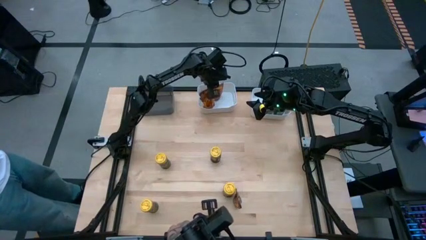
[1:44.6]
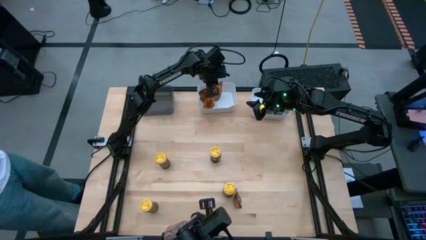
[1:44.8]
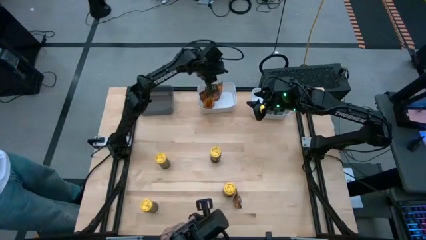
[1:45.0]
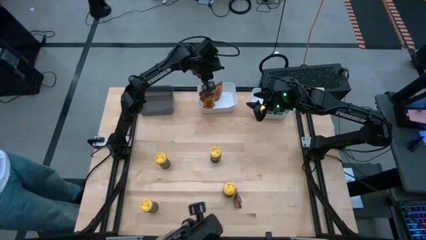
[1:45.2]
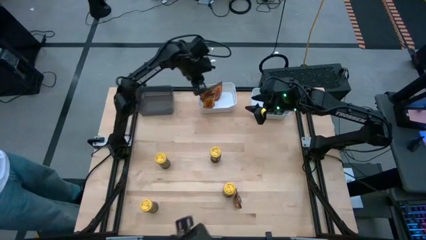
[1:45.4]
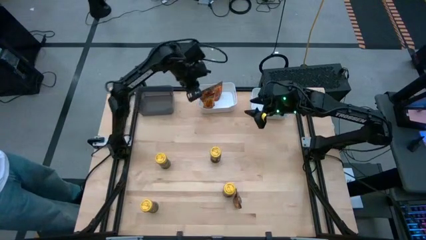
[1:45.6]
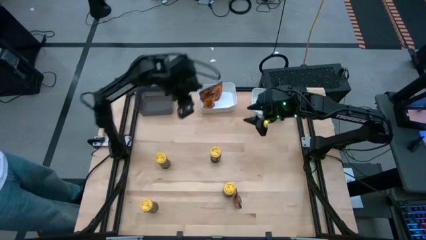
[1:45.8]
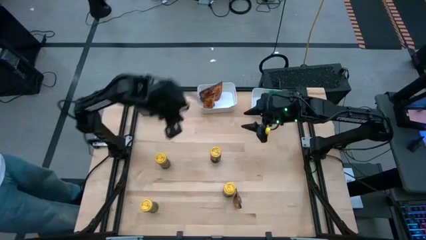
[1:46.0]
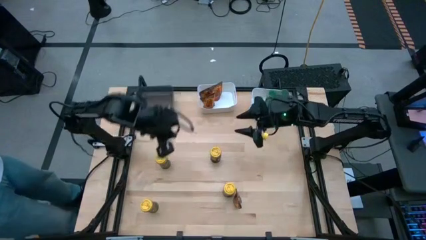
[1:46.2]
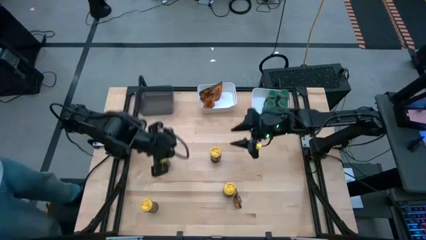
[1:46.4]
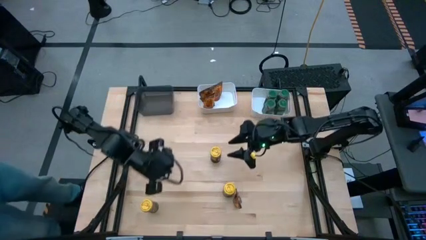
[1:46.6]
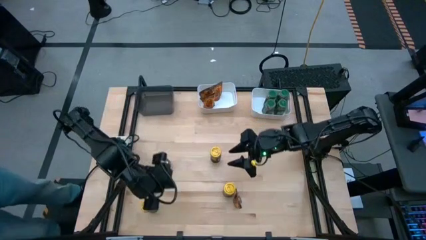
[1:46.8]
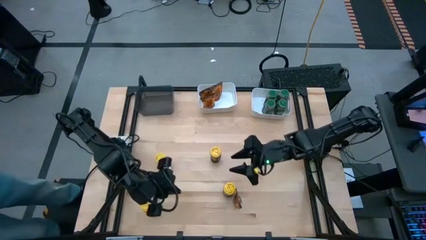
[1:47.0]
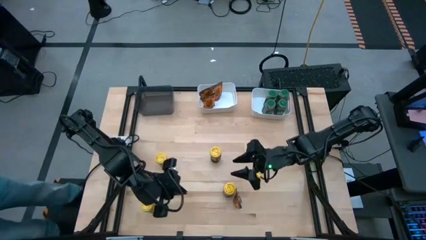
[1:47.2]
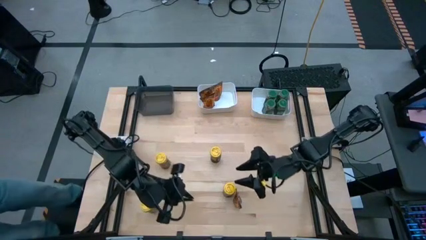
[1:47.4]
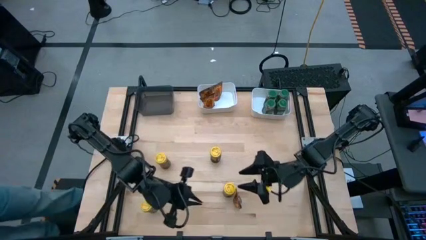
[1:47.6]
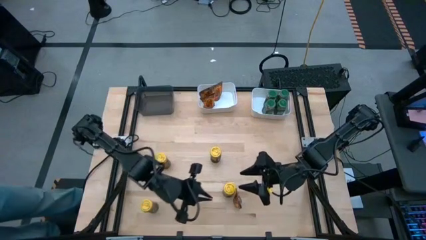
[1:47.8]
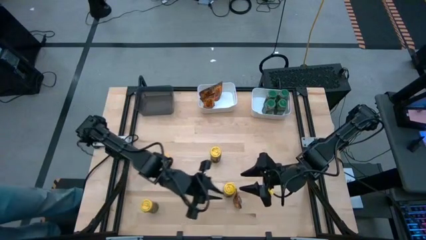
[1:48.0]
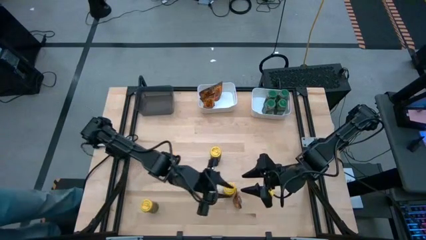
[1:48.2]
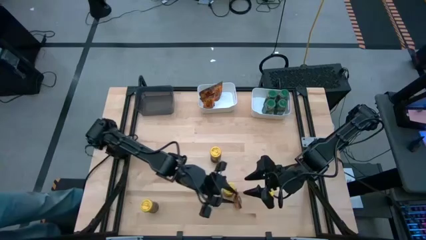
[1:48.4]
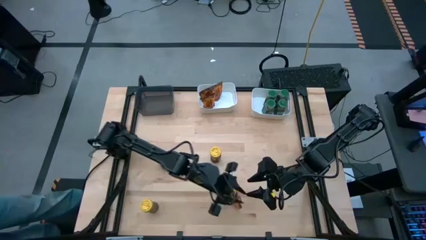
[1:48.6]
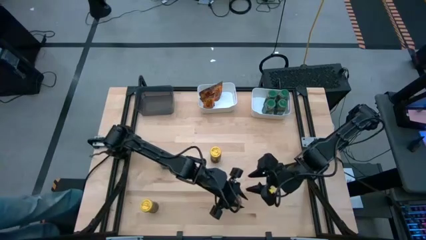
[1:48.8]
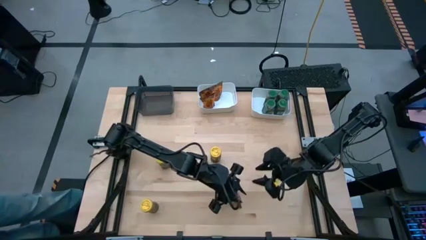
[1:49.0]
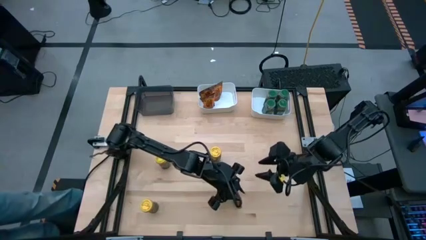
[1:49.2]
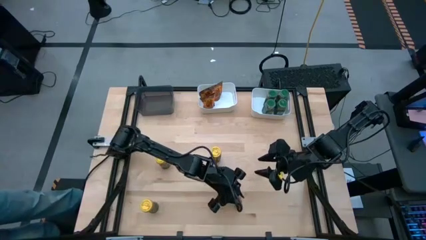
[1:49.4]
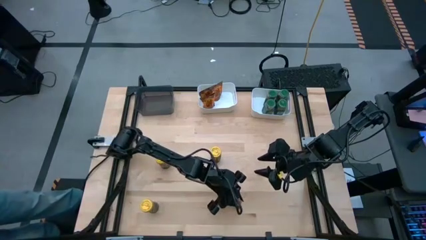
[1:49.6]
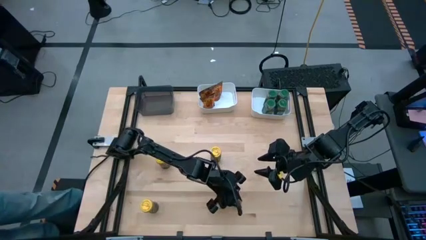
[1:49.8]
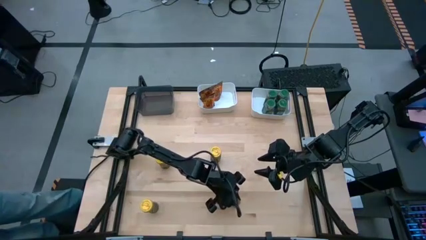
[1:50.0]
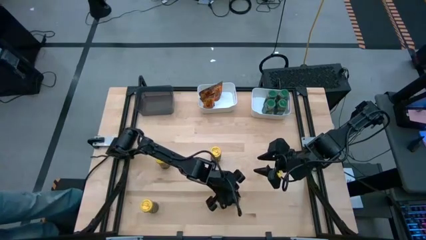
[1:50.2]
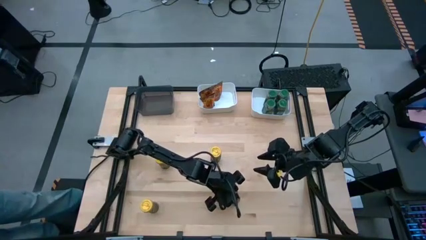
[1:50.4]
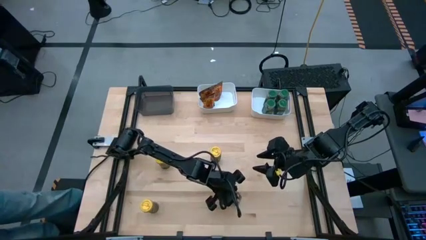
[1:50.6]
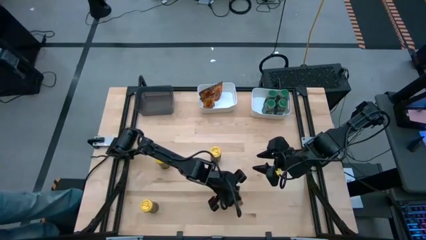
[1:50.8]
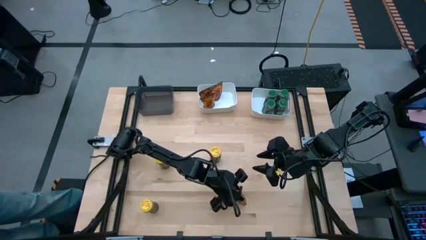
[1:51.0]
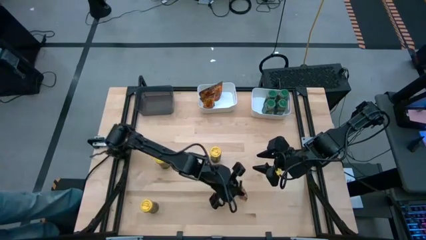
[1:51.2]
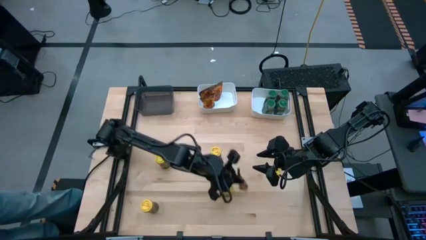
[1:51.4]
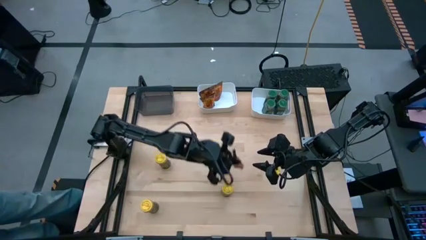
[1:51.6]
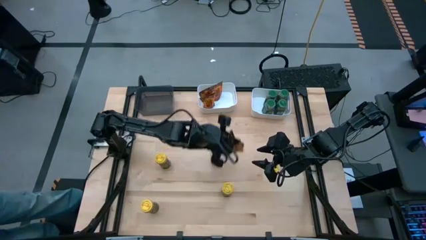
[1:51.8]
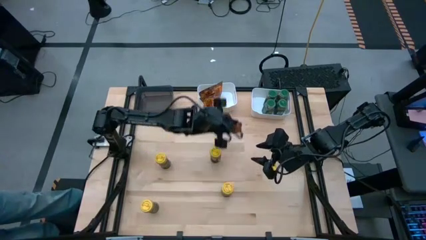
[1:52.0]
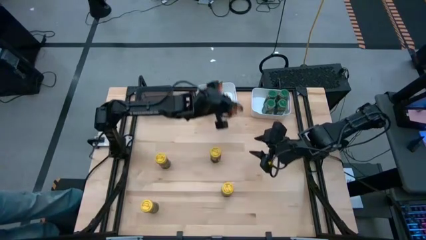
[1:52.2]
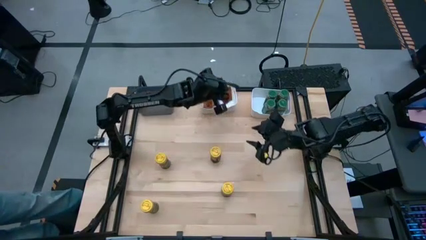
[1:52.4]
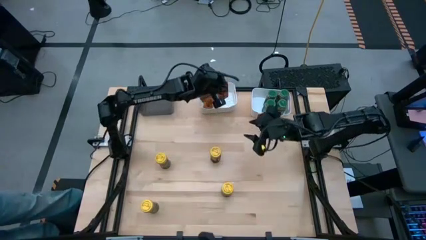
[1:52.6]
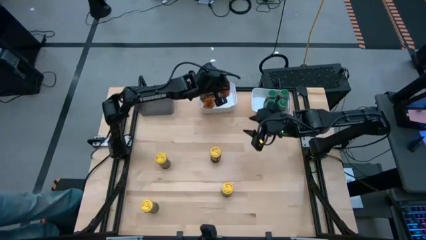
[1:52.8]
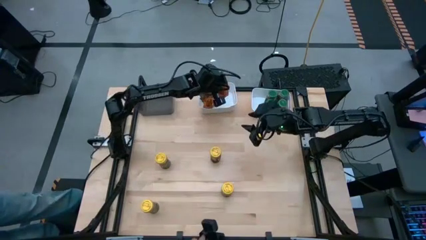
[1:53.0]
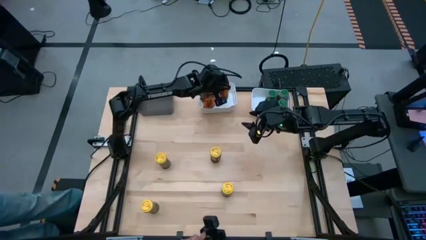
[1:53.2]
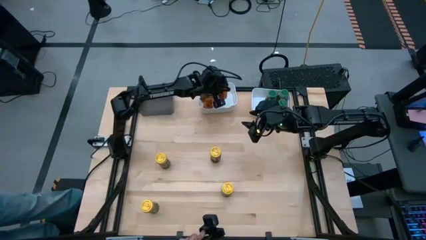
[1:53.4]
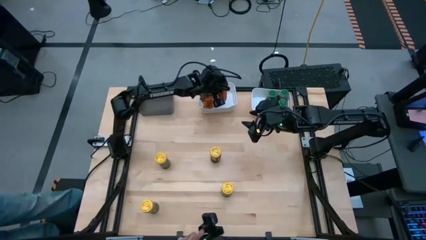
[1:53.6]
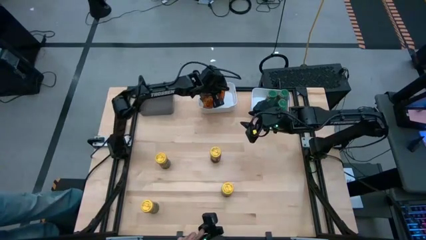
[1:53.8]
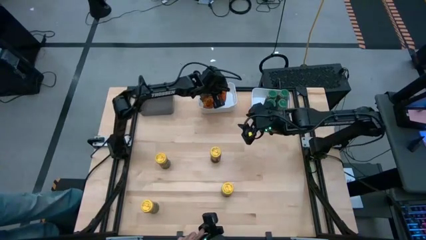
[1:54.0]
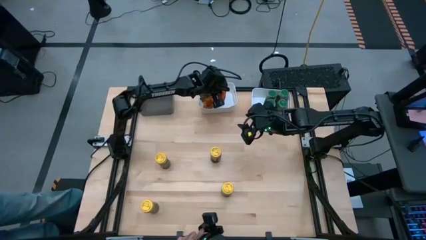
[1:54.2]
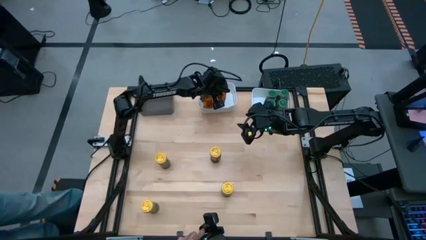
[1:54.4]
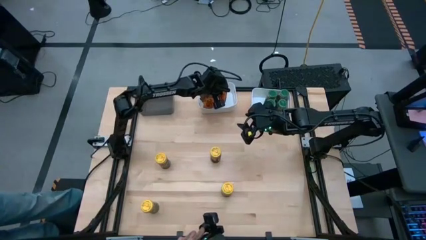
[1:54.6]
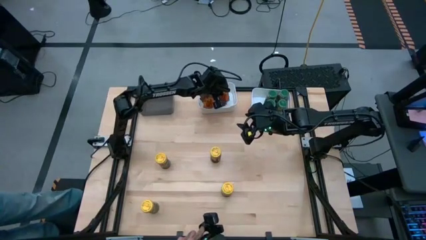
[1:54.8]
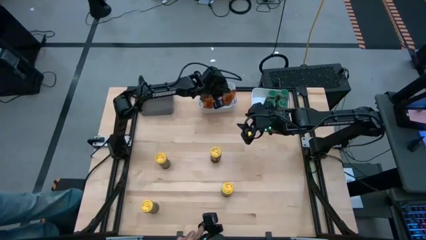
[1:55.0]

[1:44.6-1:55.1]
Task: Sort spices by type
Put the orange seasoning bag into the left white bin

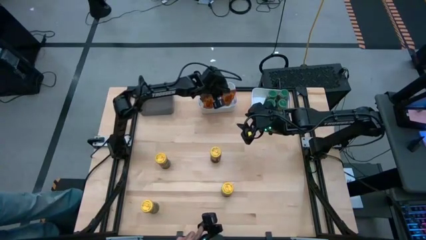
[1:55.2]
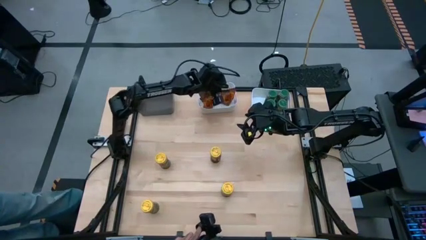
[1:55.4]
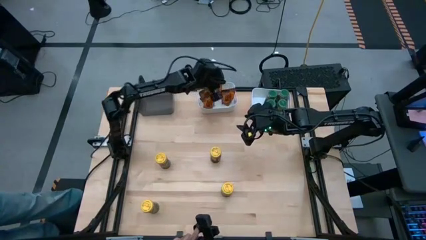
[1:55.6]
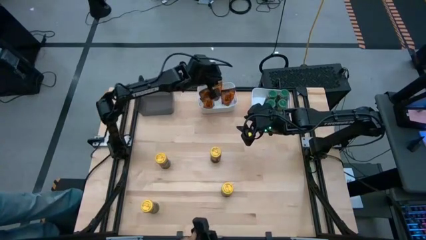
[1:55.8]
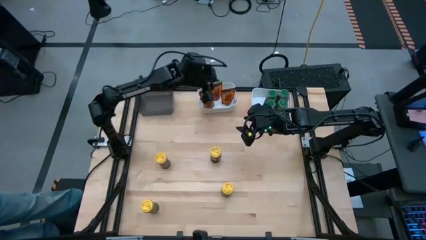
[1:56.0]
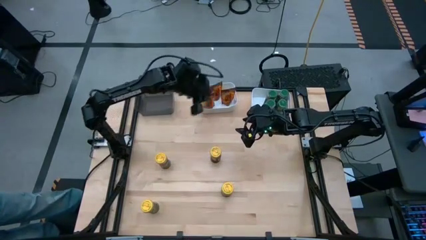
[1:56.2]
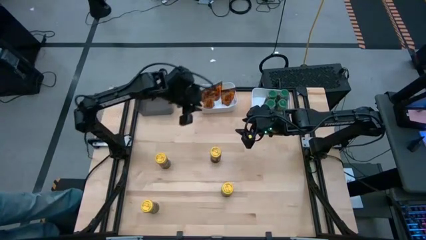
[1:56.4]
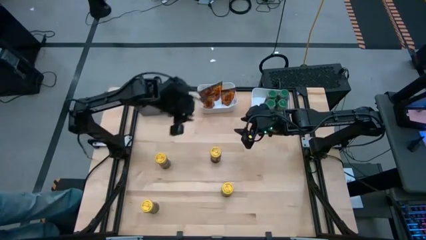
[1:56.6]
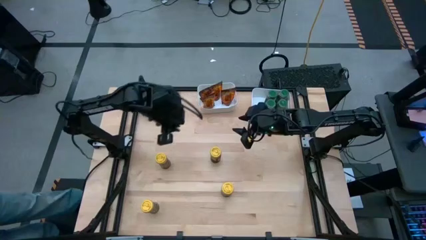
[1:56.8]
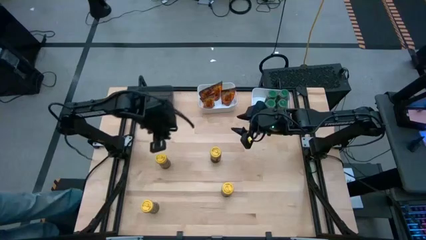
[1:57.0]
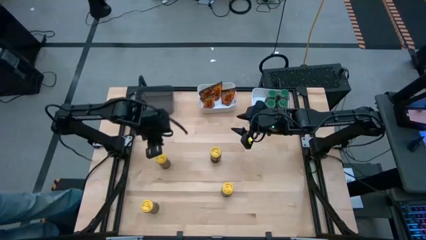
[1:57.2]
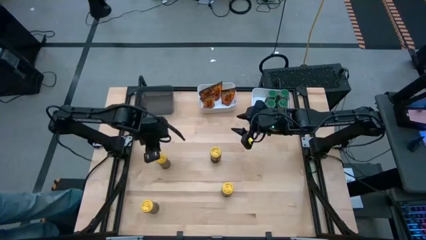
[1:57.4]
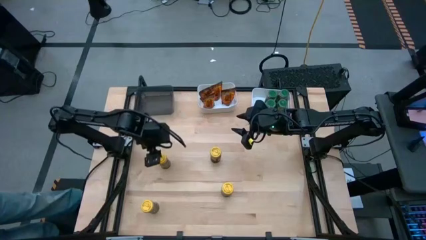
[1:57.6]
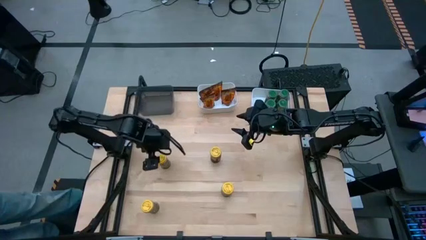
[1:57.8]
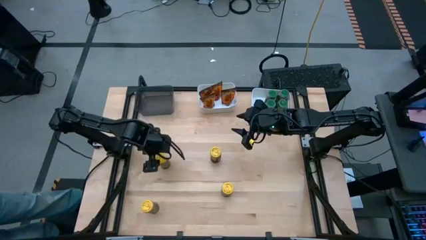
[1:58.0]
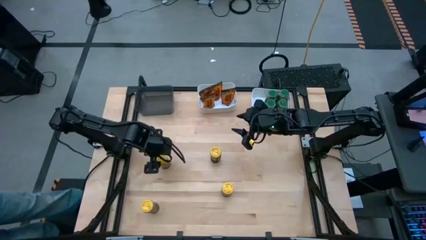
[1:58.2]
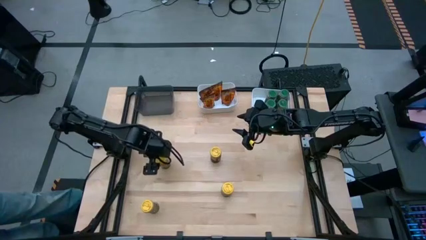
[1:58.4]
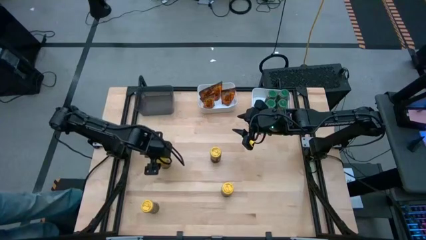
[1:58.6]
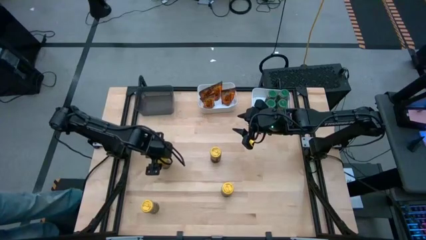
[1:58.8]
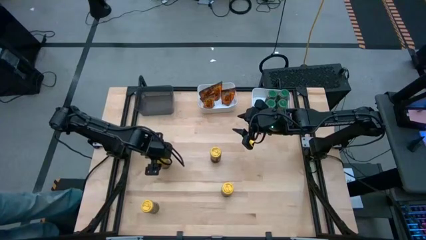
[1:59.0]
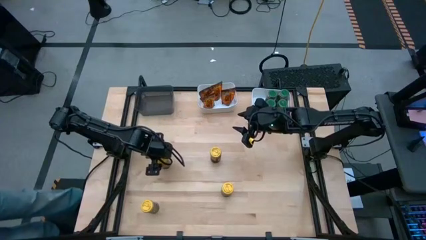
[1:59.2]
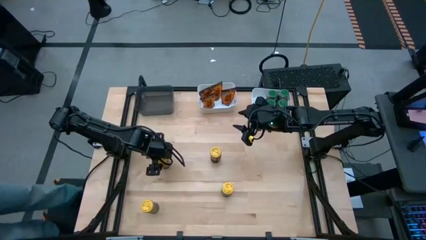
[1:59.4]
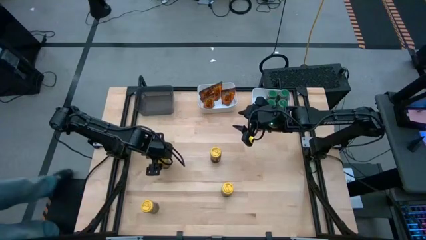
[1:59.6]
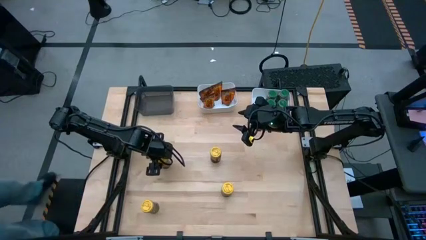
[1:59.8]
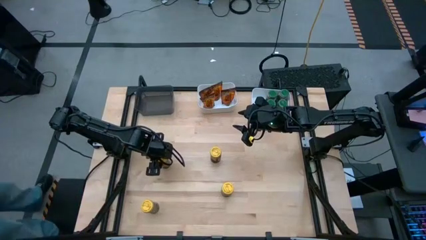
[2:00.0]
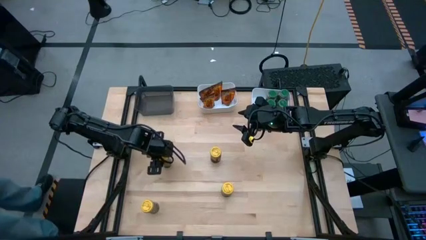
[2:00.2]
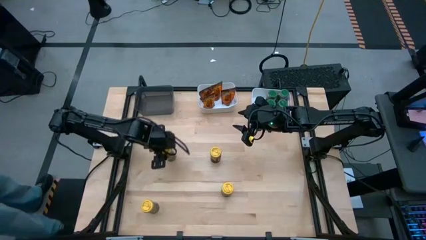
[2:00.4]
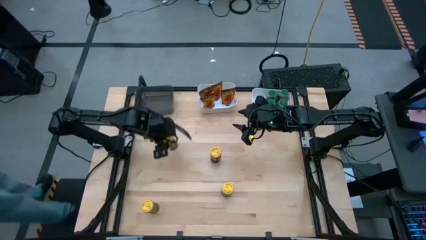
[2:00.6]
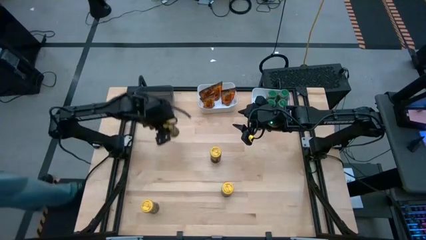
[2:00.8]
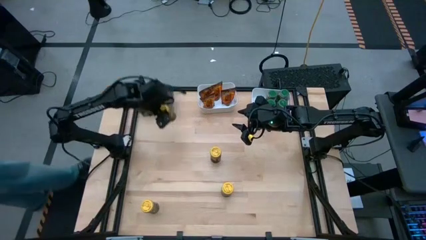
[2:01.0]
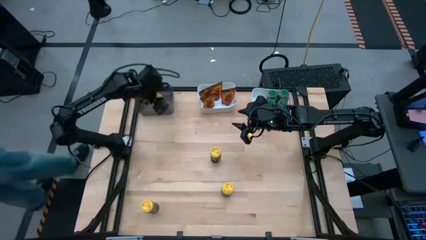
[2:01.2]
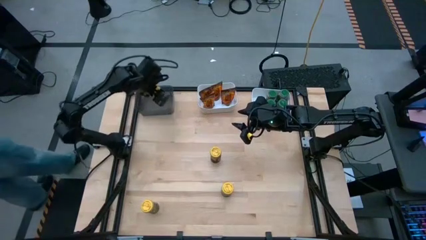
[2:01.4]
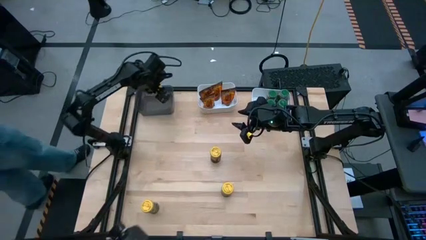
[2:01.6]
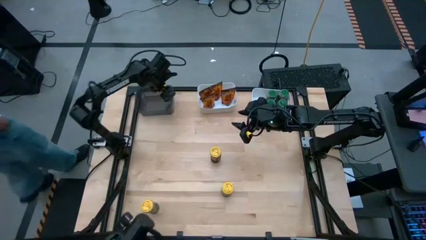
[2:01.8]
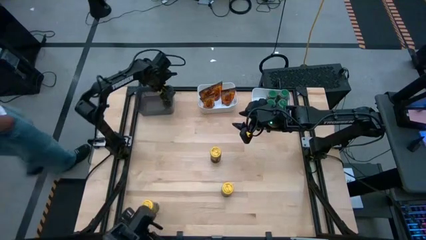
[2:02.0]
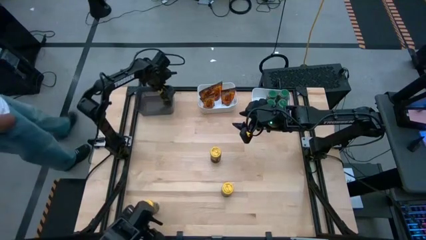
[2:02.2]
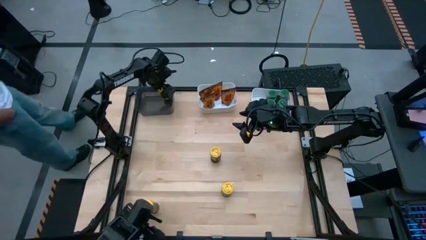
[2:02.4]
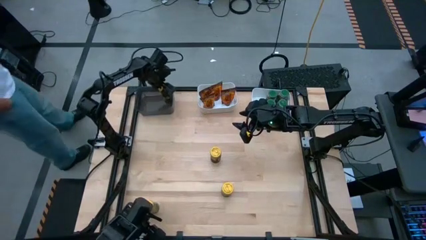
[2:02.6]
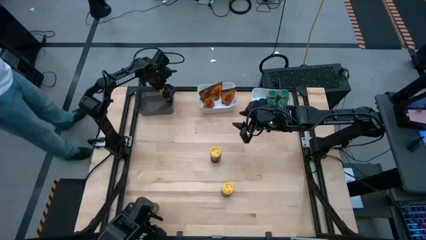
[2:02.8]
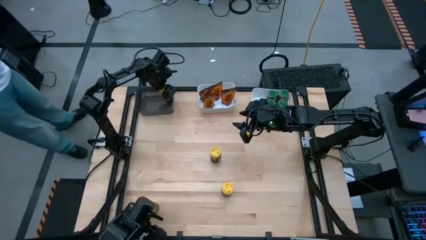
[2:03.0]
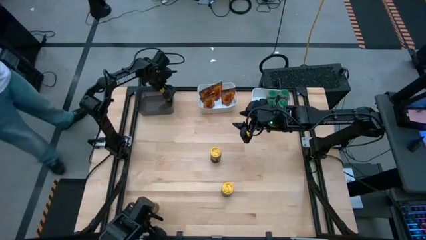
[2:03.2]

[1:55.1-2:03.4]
Put the top left yellow seasoning bottle into the black bin
